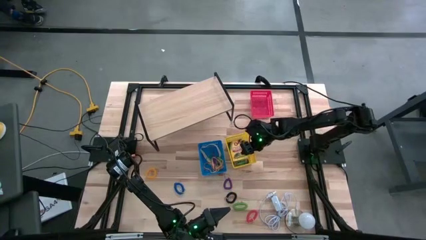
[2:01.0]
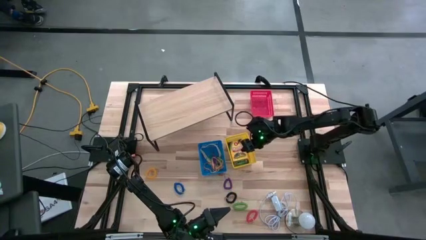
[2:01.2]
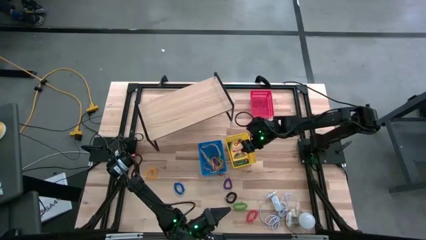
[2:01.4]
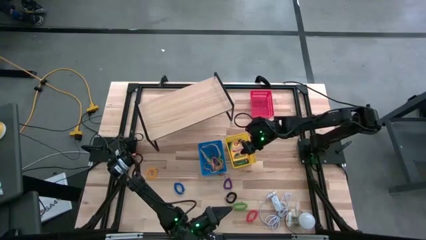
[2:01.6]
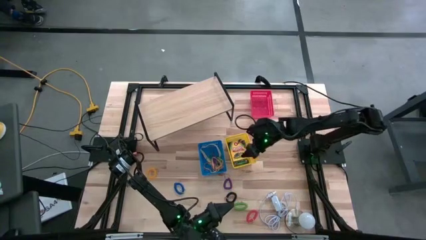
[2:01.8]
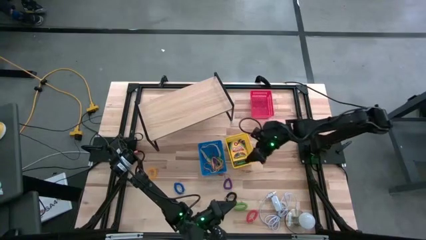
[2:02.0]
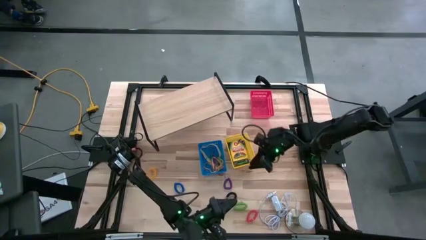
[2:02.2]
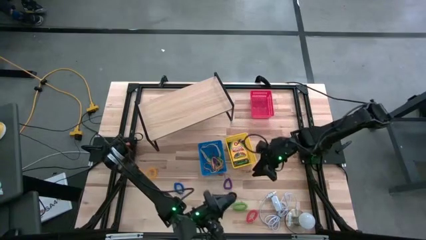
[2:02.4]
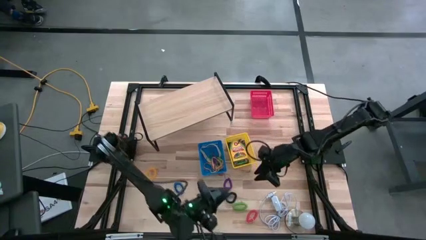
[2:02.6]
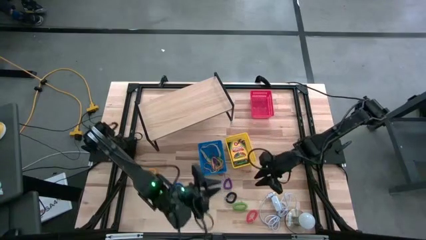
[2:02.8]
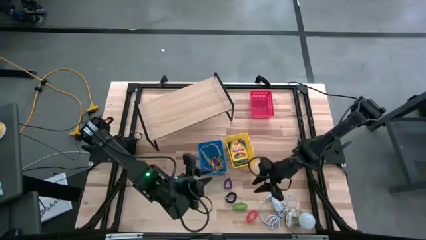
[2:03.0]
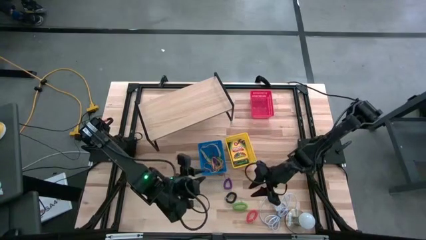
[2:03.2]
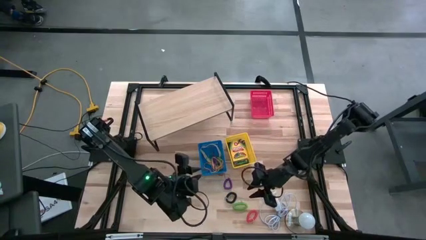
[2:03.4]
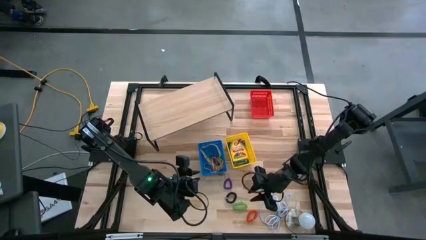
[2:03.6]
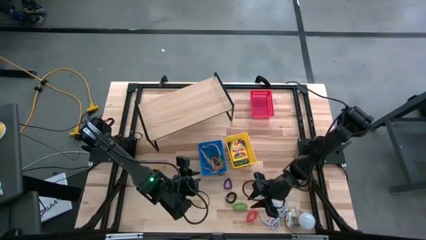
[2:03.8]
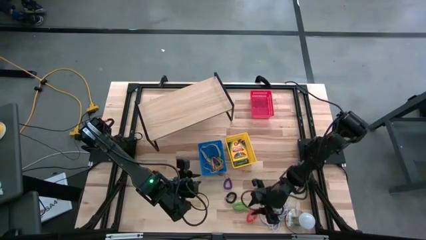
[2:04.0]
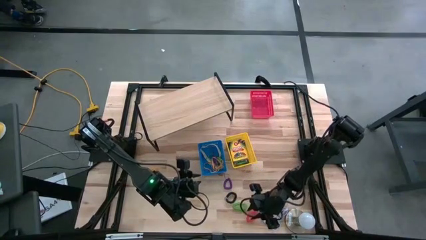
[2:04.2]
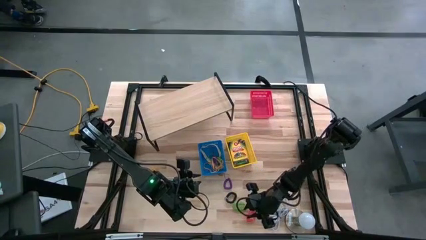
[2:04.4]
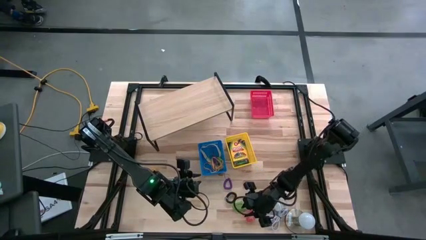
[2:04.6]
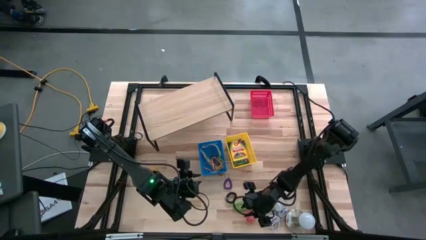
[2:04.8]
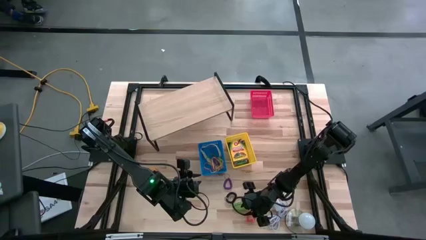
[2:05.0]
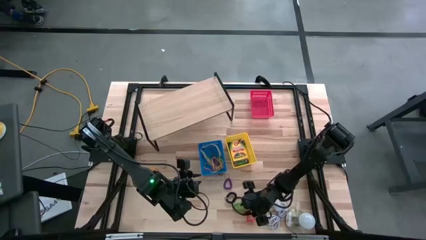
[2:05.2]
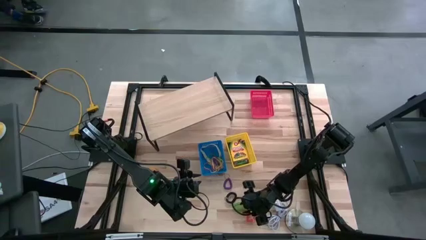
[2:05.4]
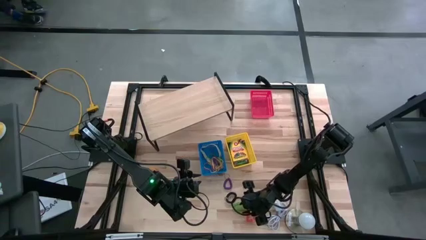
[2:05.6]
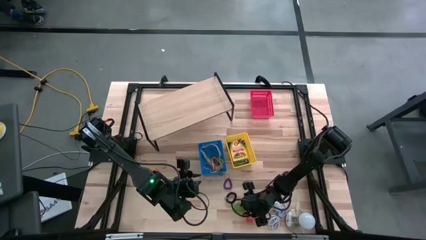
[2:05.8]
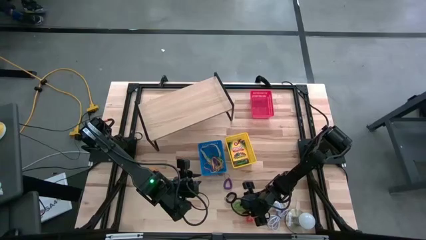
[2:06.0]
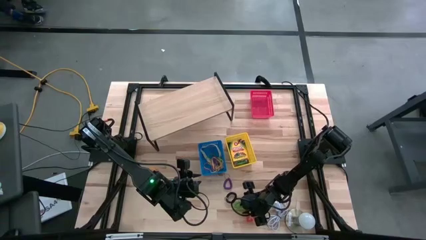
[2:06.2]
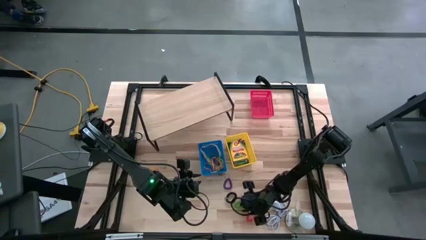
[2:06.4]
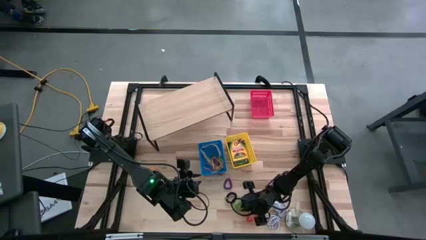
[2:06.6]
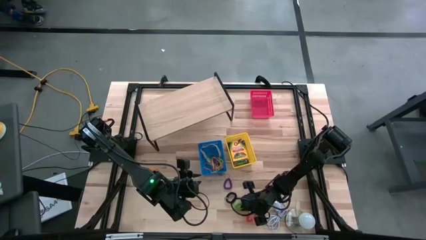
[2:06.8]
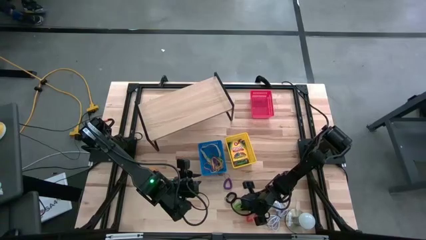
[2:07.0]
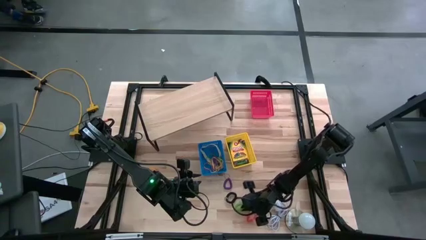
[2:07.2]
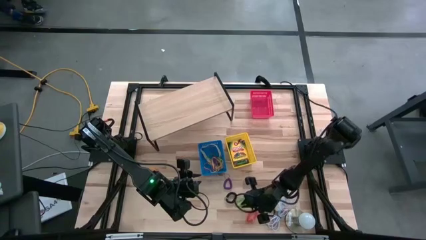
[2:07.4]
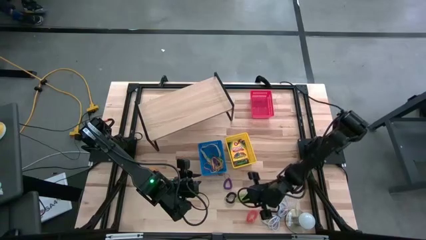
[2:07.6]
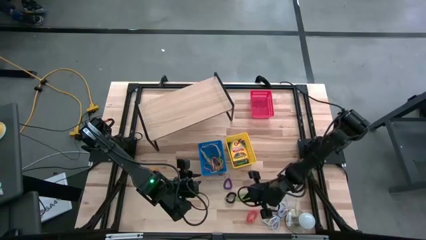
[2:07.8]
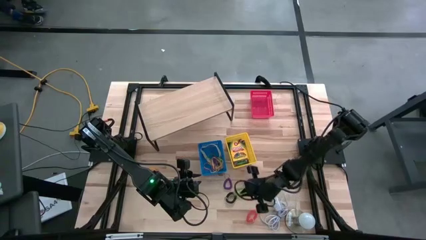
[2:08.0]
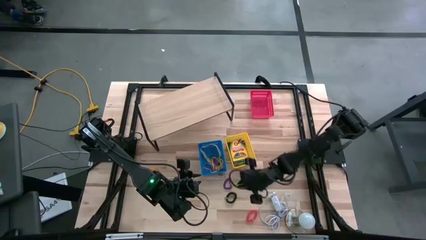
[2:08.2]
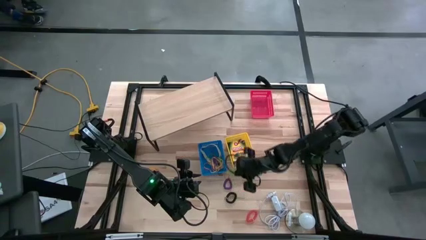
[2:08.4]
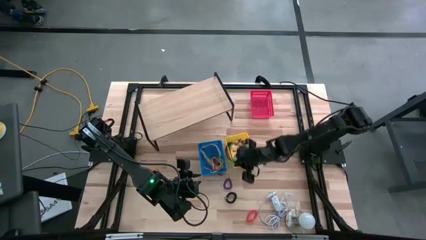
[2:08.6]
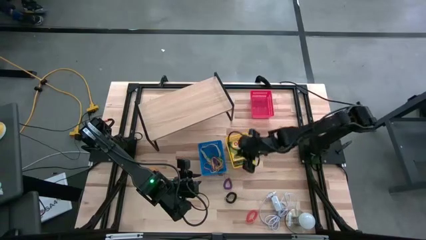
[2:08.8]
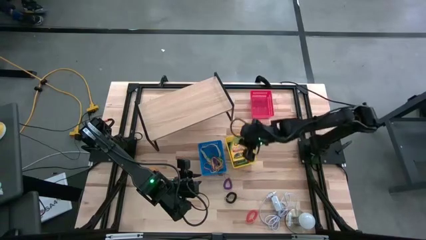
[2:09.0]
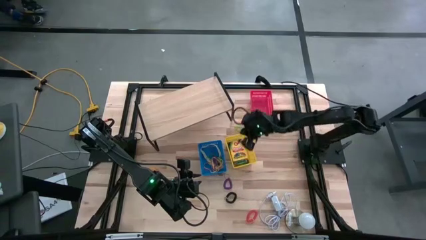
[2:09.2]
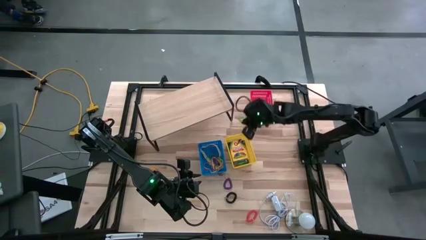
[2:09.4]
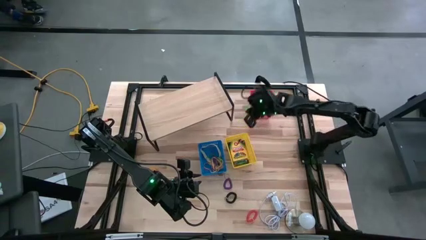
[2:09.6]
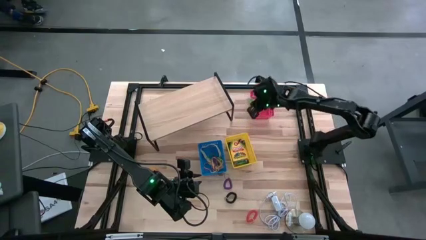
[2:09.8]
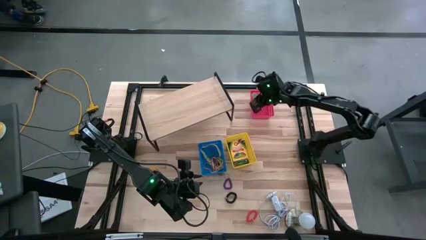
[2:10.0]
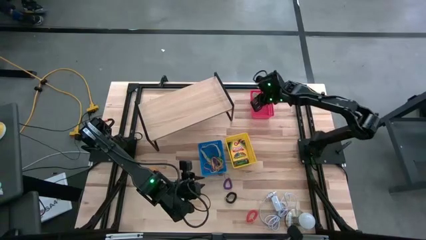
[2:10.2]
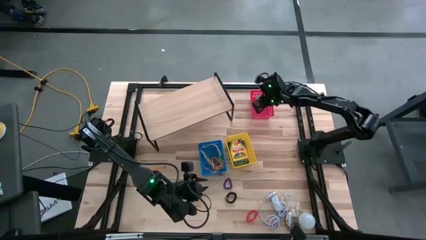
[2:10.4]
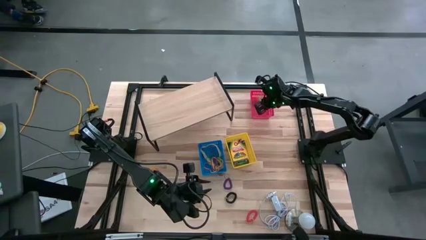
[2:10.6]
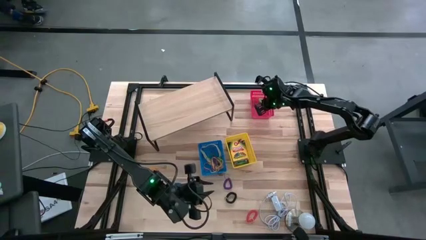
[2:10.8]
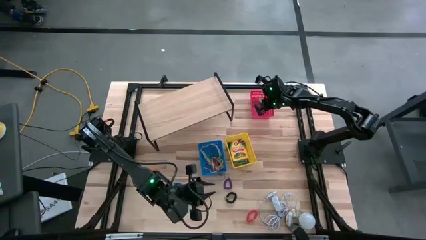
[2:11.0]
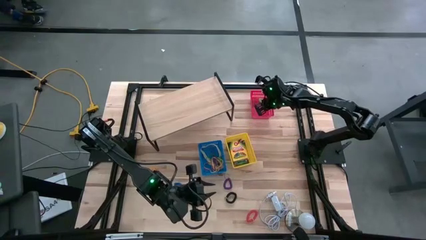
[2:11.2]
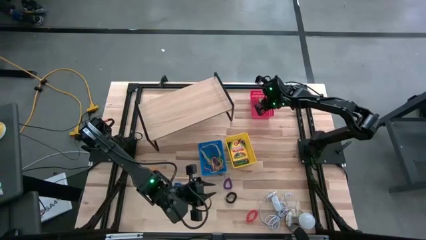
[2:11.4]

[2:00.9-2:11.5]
Task: Pick & Place Office Desk Supplies
Put the green spring keychain into the red bin
